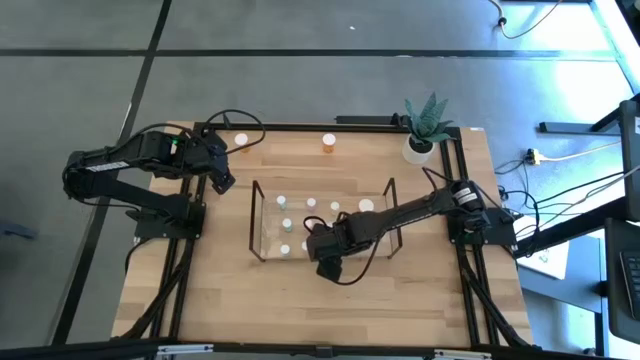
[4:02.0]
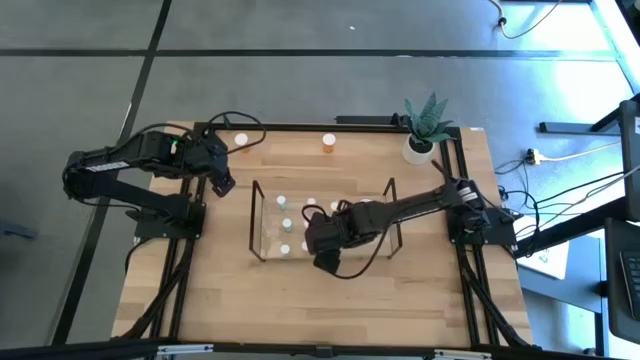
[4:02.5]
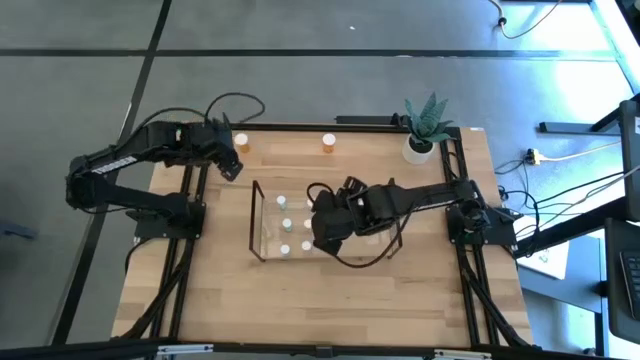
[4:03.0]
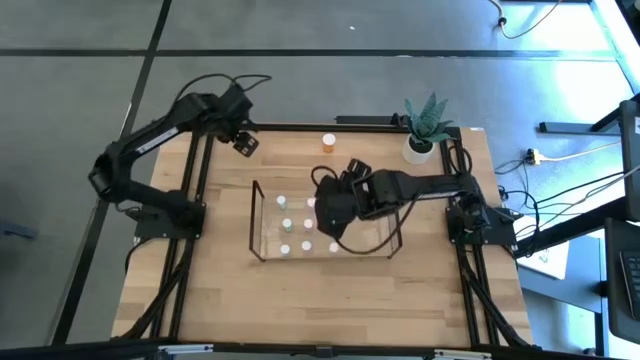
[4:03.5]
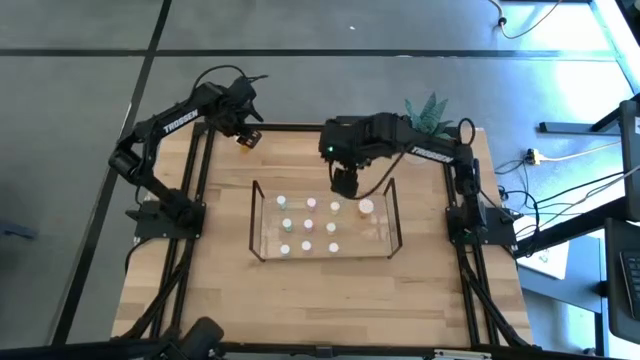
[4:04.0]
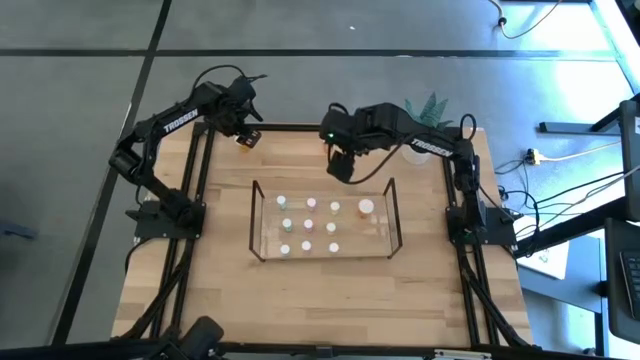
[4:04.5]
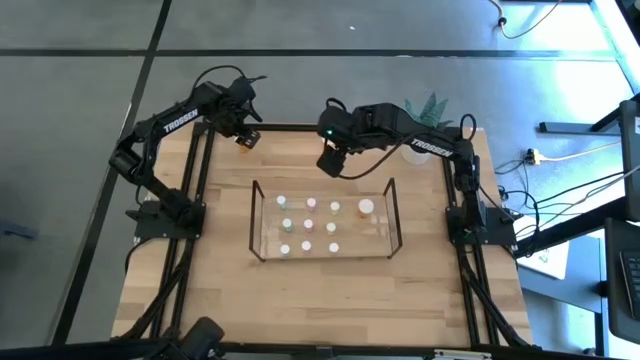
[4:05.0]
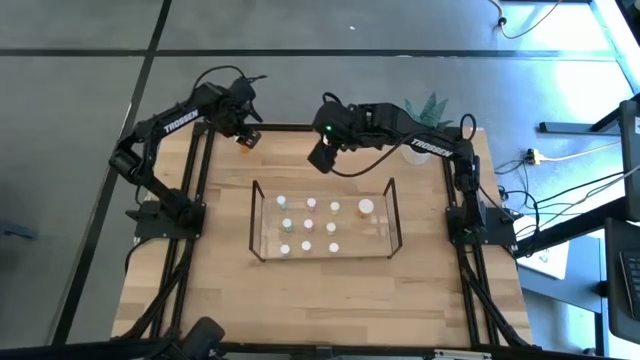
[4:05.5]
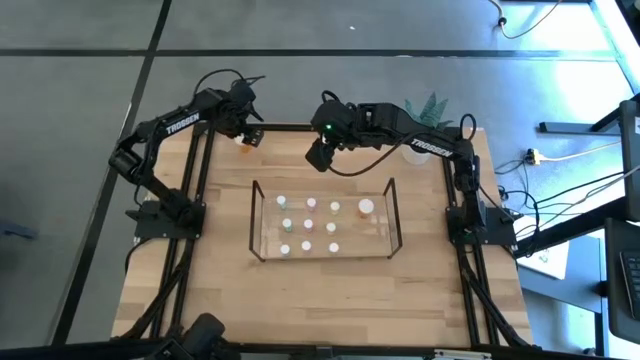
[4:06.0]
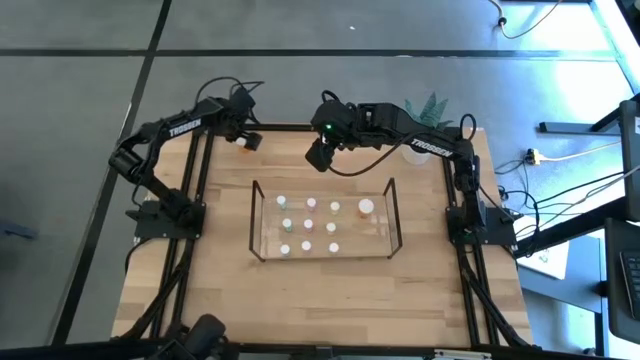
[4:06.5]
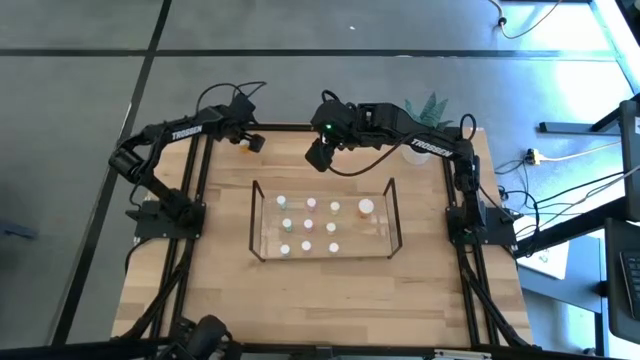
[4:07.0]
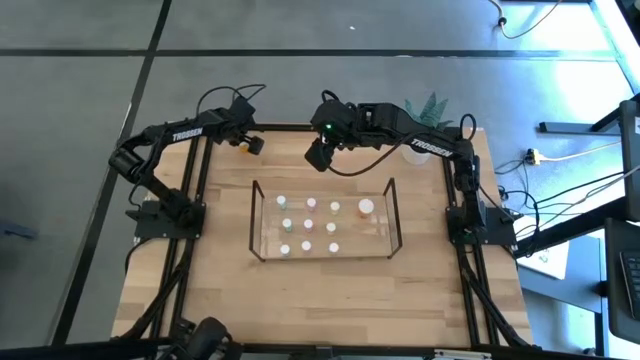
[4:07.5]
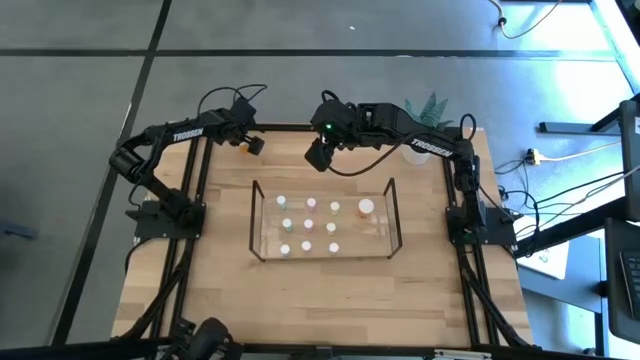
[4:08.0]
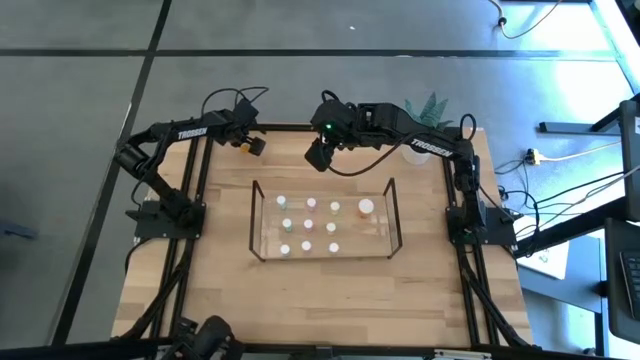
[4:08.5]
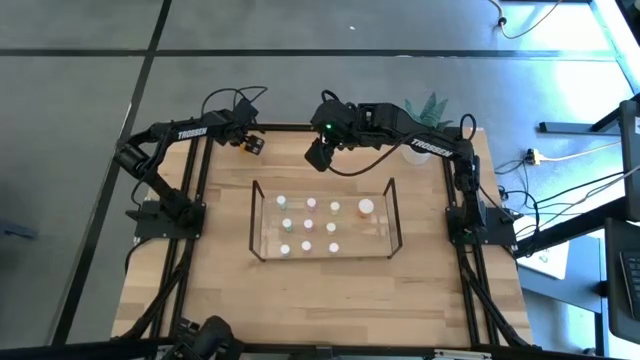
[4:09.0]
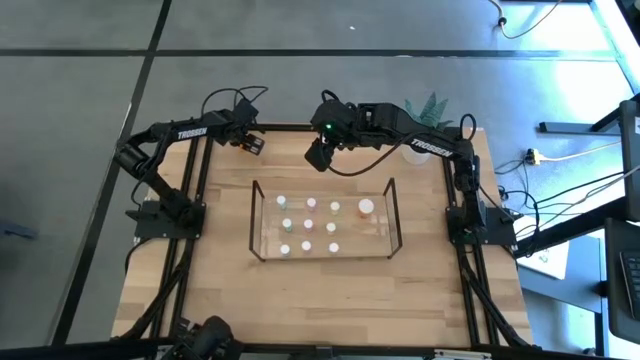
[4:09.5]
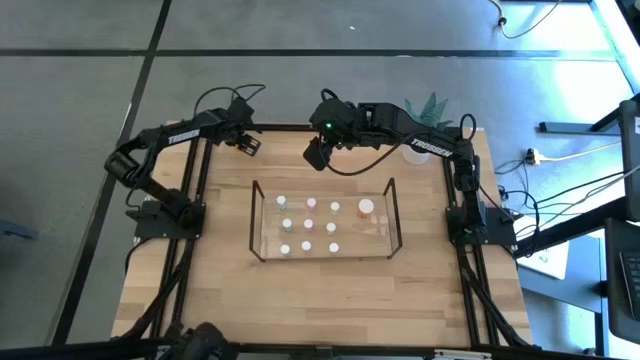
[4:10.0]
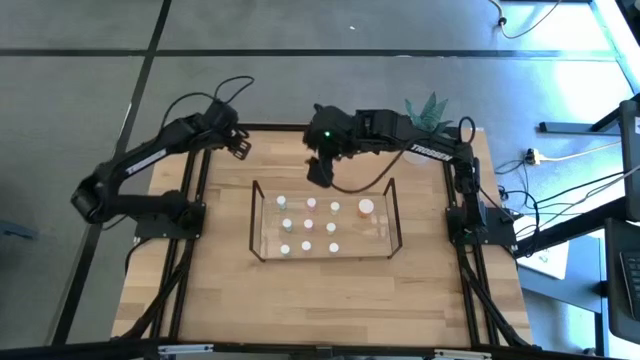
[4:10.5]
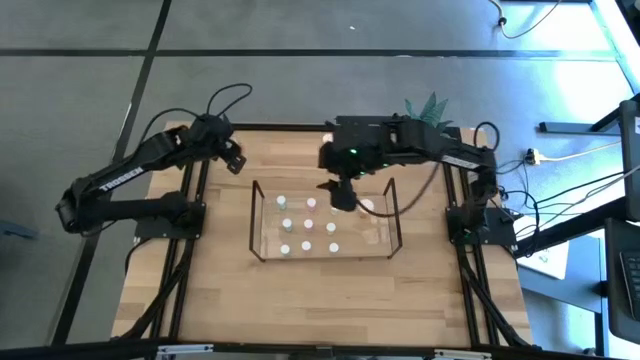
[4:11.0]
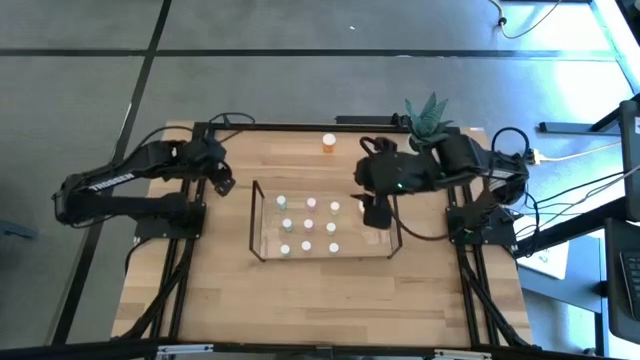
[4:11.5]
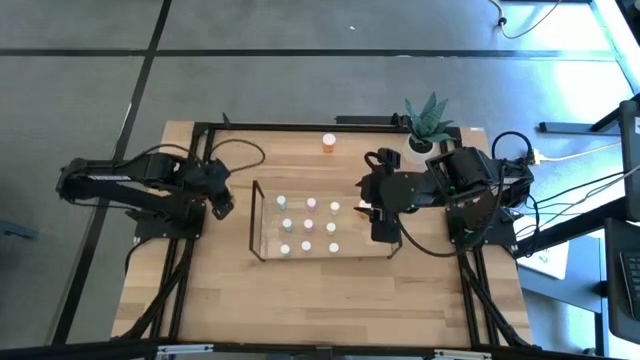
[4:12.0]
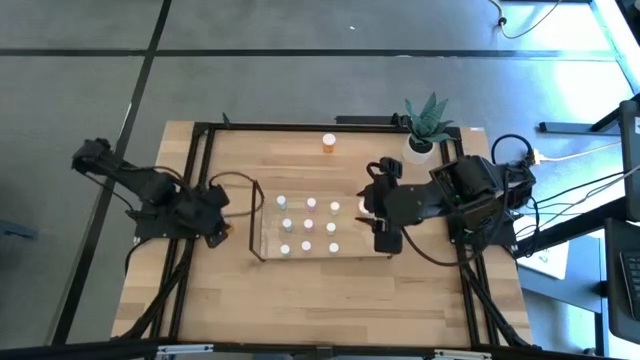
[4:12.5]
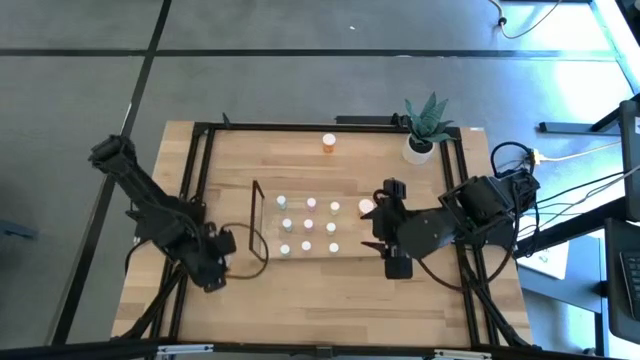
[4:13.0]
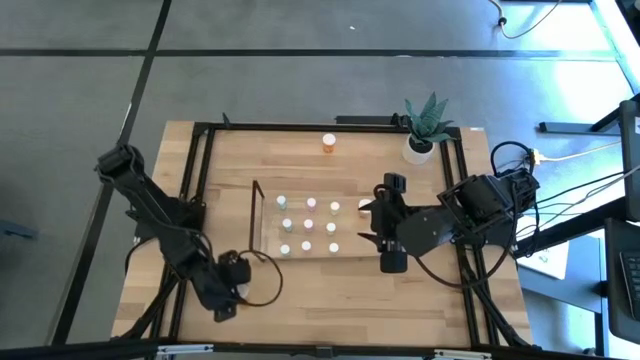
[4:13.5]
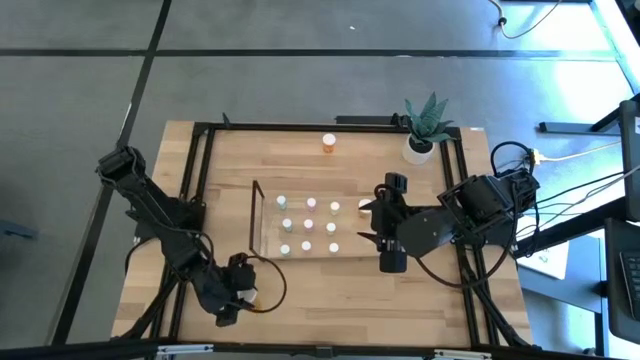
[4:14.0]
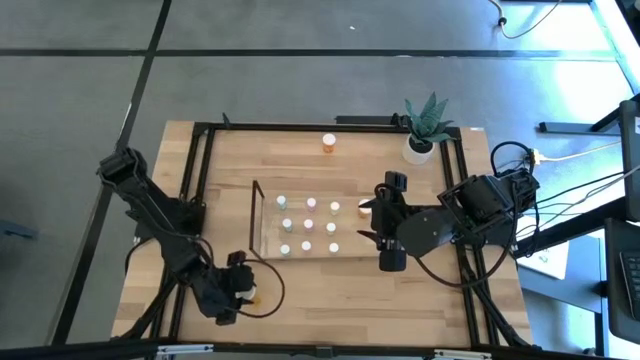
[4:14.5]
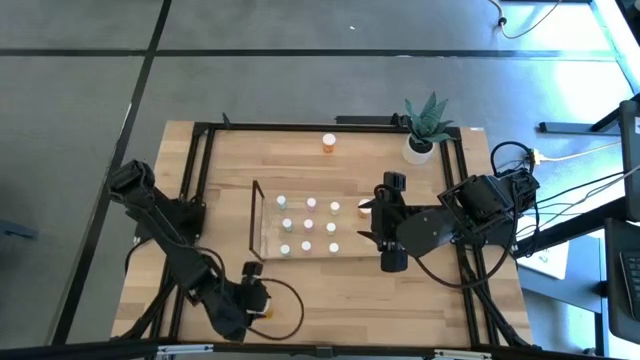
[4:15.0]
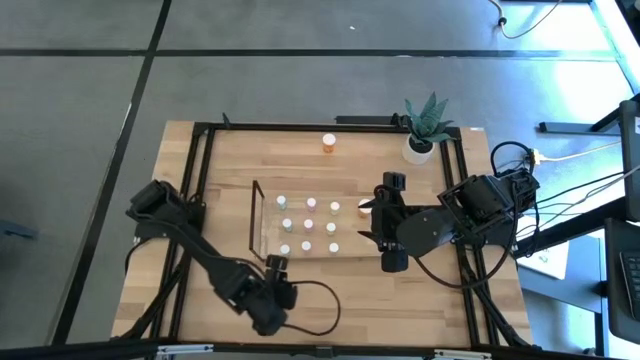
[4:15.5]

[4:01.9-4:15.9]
Task: Pick and place medicine bottles onto shelf by color
Put the left orange pill bottle on the shelf aligned with the other orange pill bottle

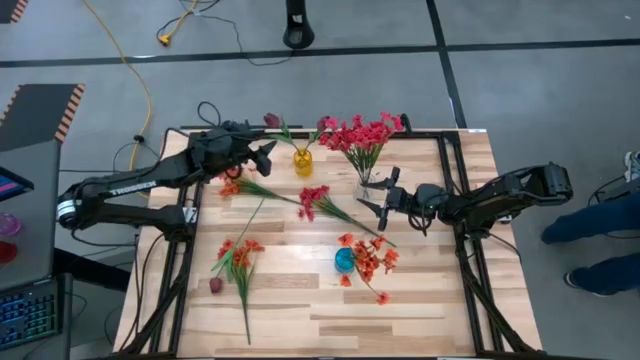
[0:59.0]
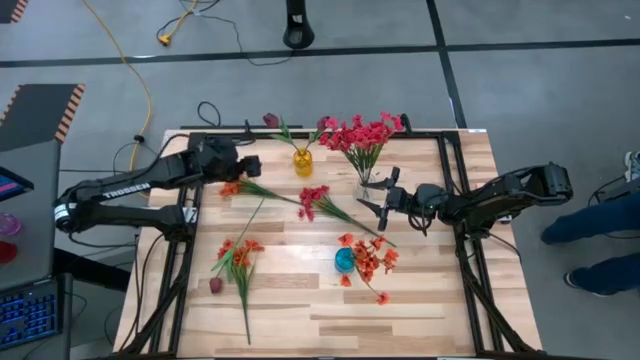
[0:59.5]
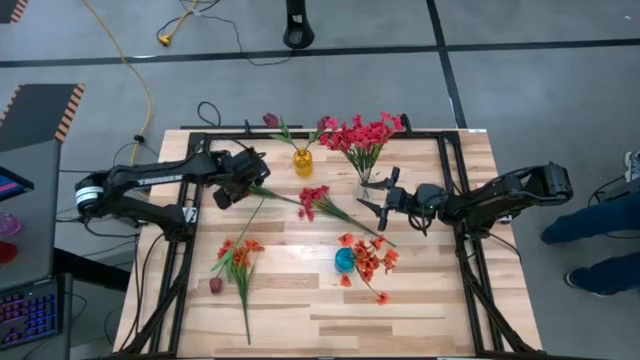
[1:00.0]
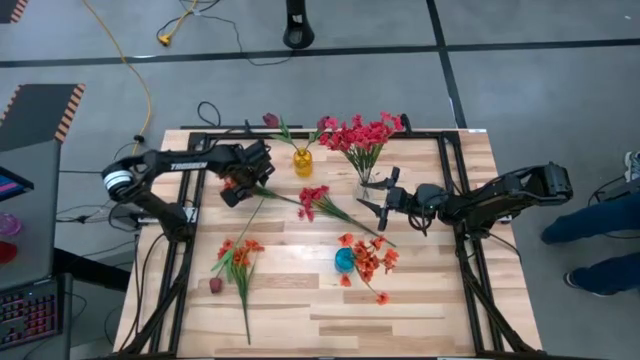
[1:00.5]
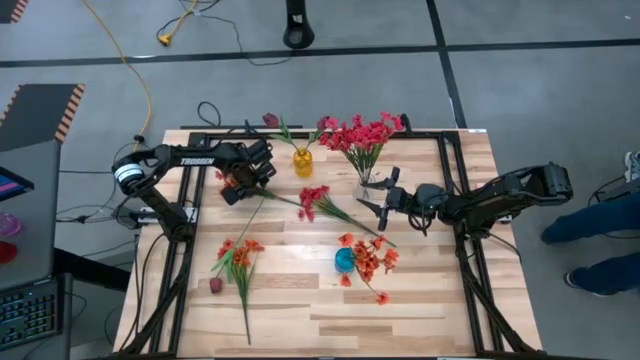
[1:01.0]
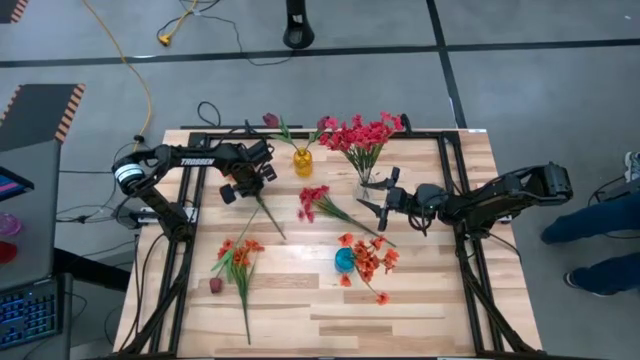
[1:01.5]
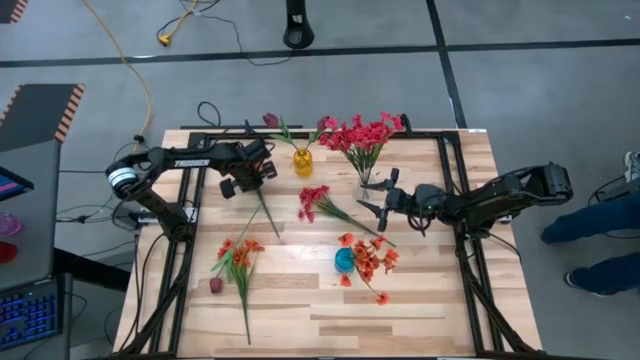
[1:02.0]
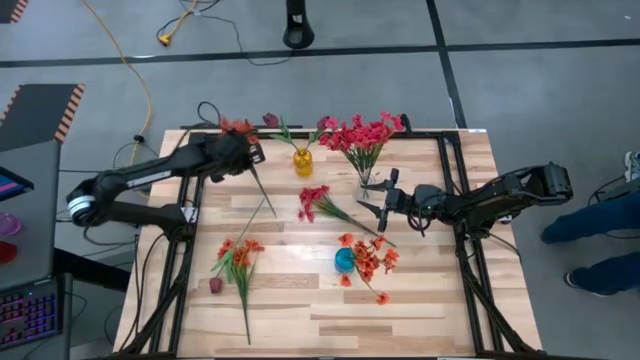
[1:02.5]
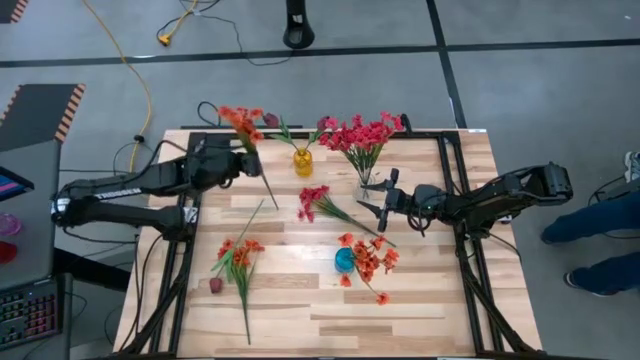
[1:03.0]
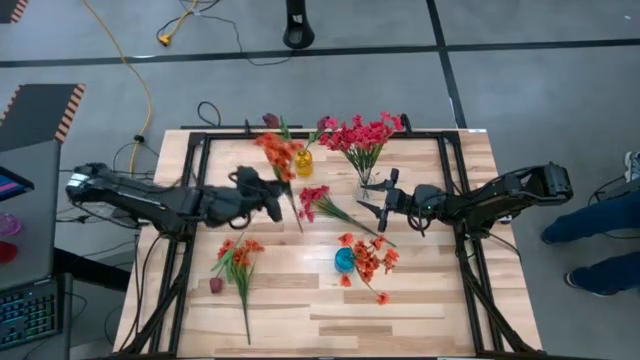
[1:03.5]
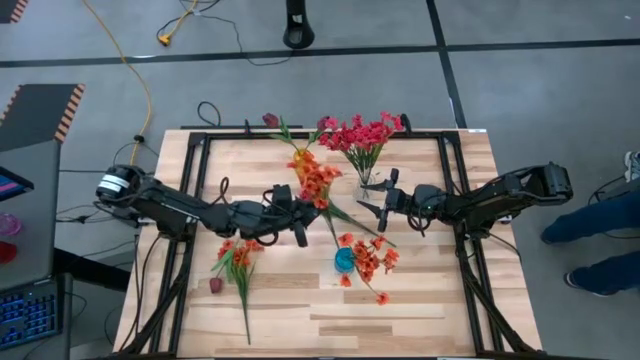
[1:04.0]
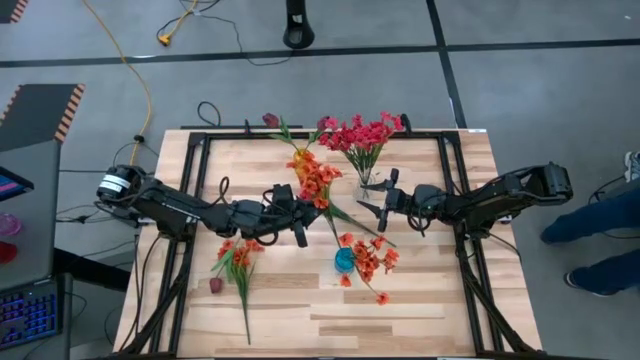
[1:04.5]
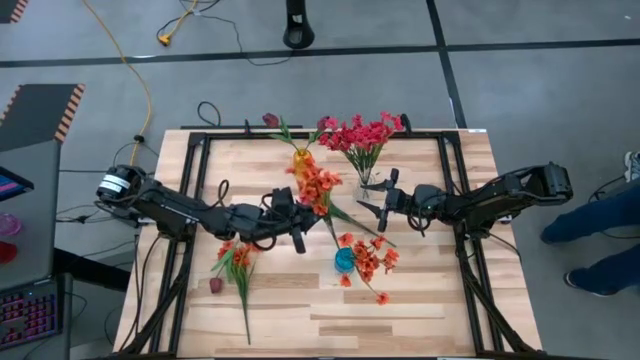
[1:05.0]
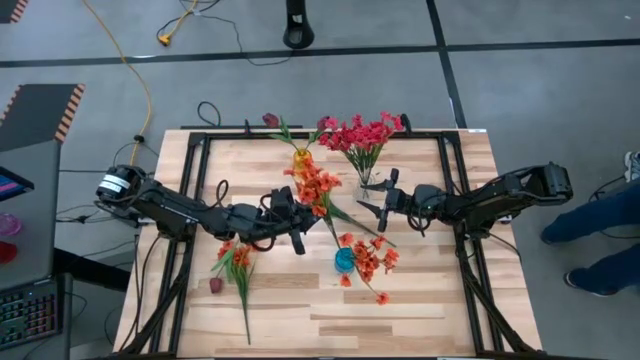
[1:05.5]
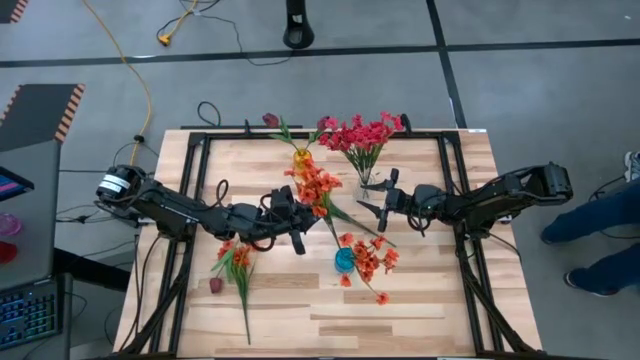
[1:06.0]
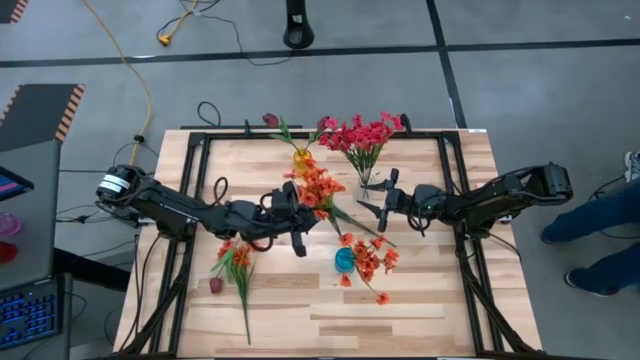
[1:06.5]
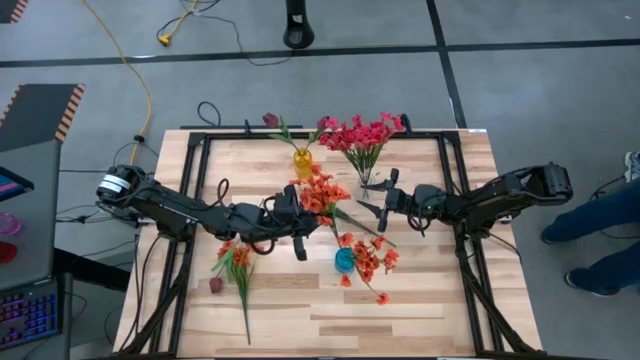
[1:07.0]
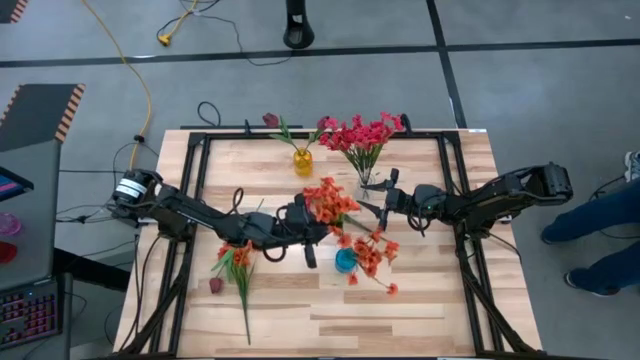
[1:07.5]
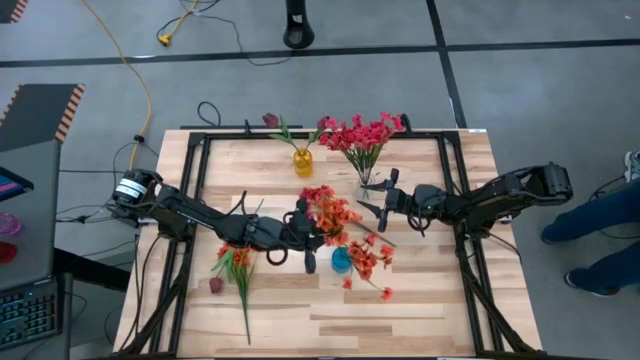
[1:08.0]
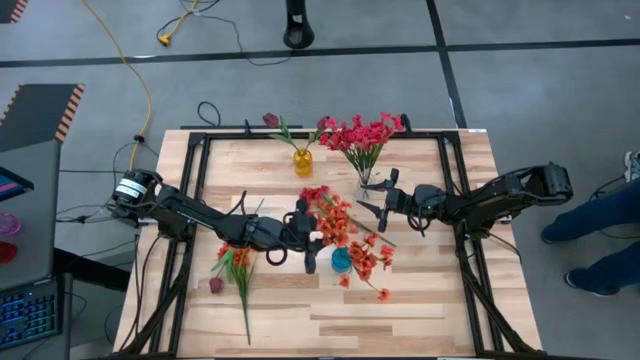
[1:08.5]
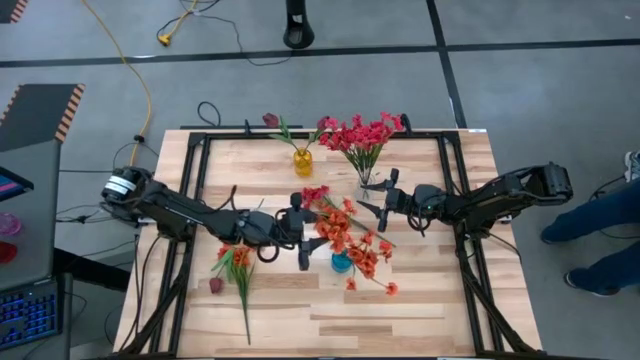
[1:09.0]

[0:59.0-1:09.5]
Task: Sort flowers into vase by color
Put the top orange flowers into the blue vase
